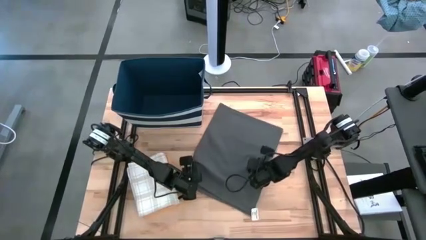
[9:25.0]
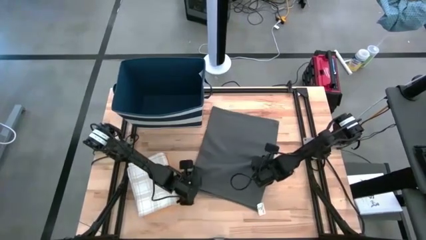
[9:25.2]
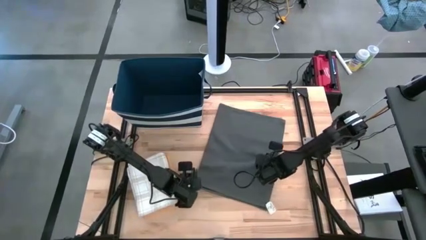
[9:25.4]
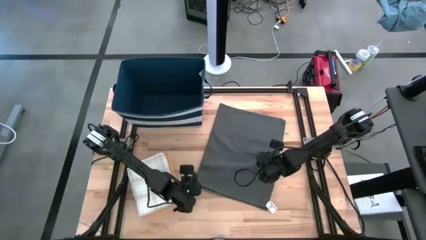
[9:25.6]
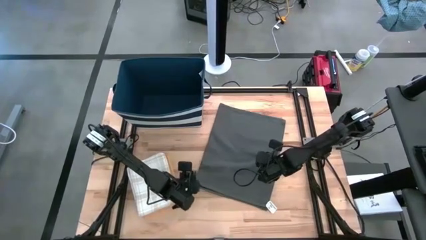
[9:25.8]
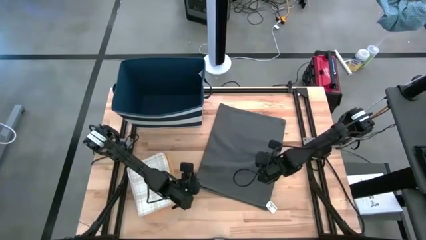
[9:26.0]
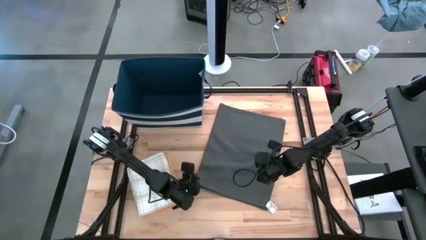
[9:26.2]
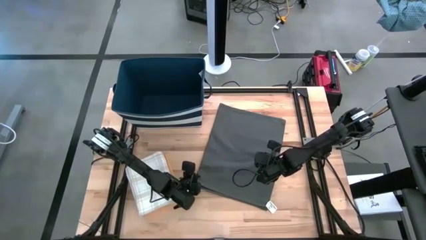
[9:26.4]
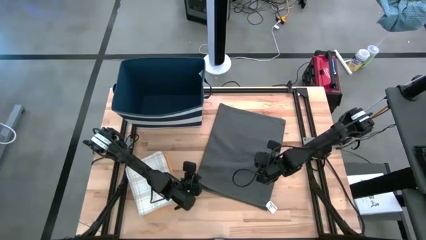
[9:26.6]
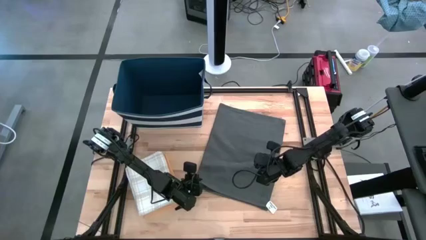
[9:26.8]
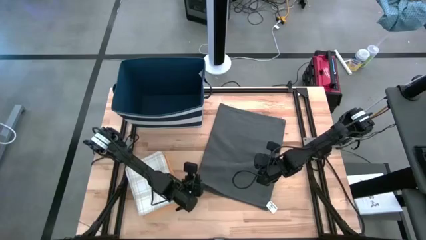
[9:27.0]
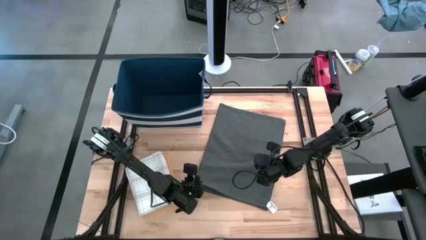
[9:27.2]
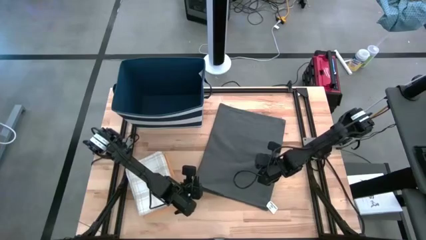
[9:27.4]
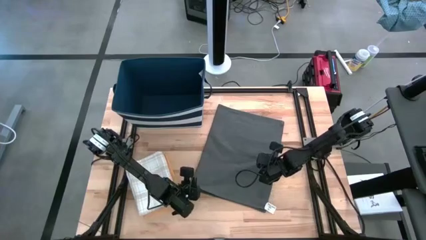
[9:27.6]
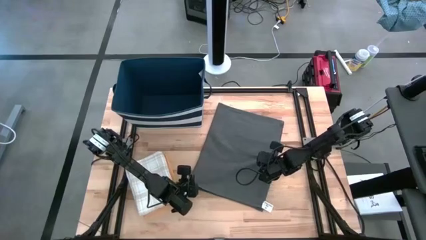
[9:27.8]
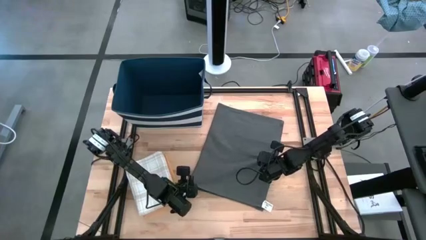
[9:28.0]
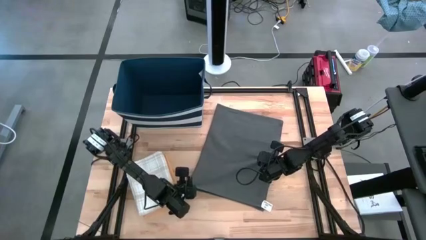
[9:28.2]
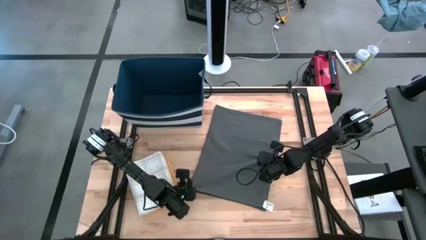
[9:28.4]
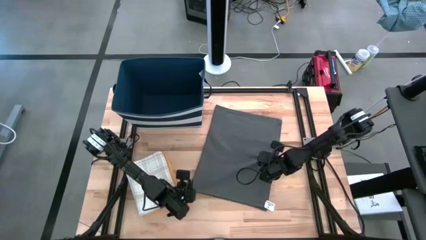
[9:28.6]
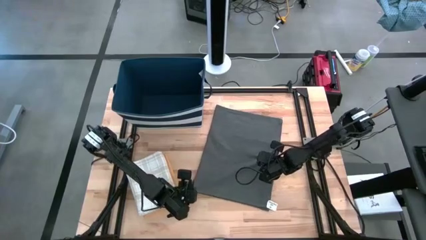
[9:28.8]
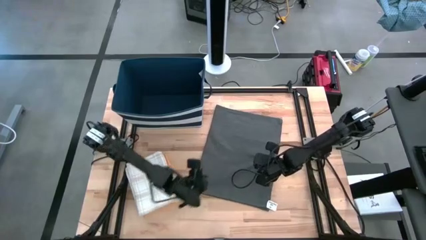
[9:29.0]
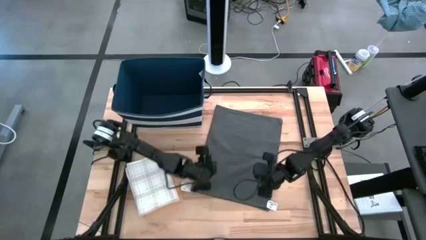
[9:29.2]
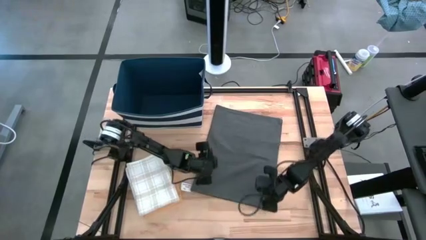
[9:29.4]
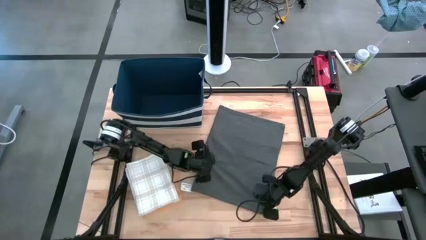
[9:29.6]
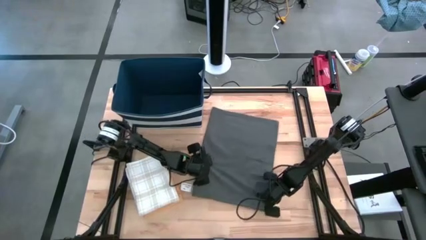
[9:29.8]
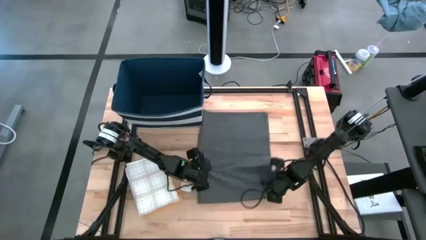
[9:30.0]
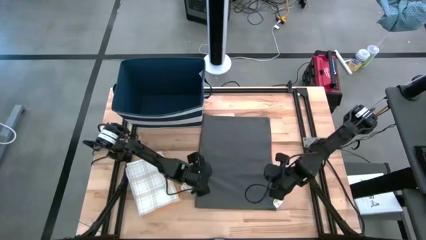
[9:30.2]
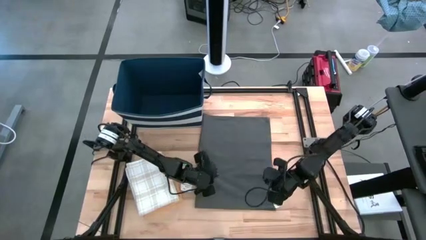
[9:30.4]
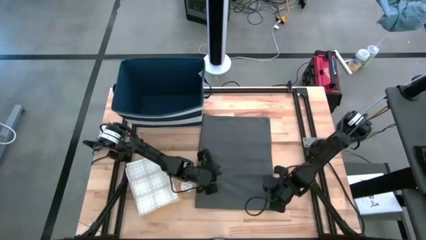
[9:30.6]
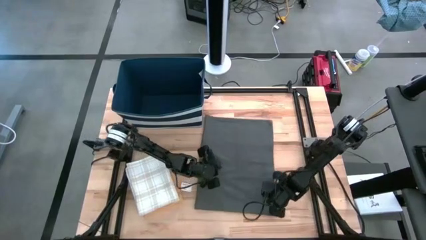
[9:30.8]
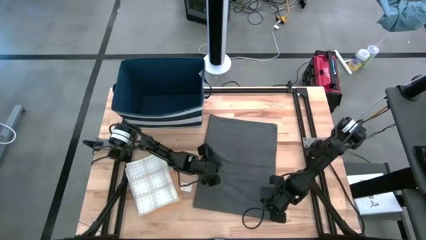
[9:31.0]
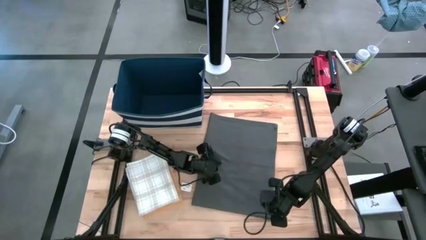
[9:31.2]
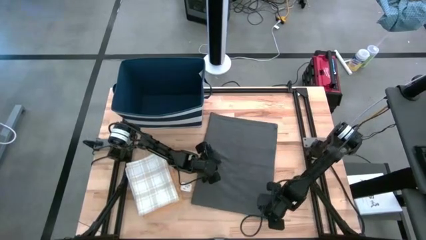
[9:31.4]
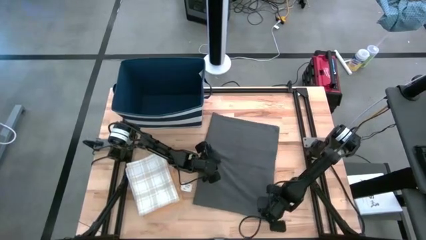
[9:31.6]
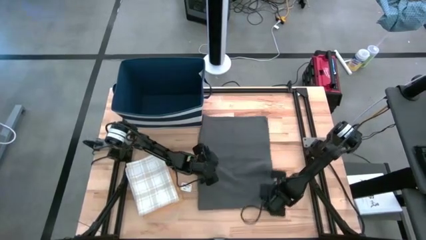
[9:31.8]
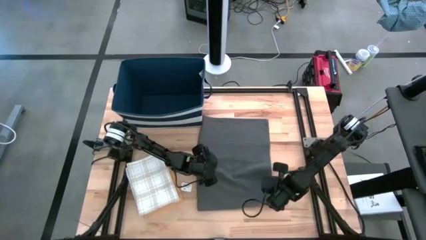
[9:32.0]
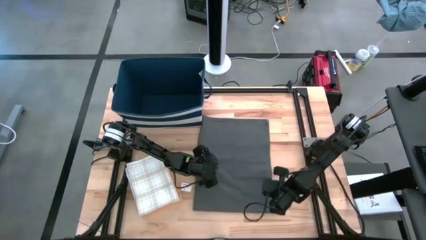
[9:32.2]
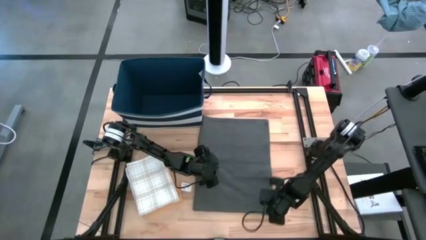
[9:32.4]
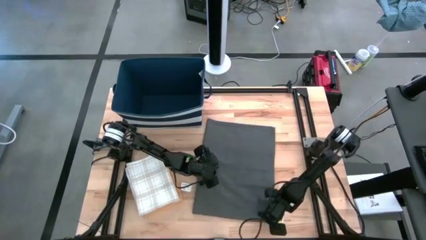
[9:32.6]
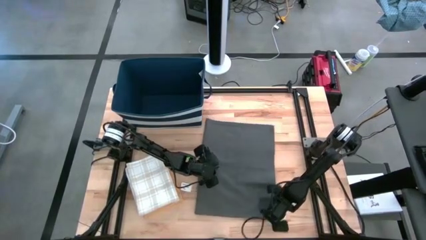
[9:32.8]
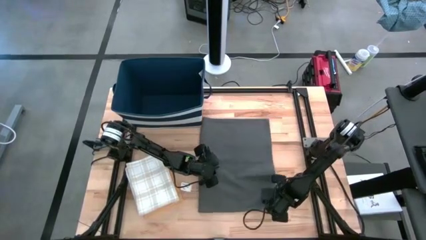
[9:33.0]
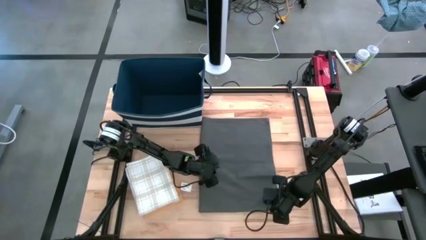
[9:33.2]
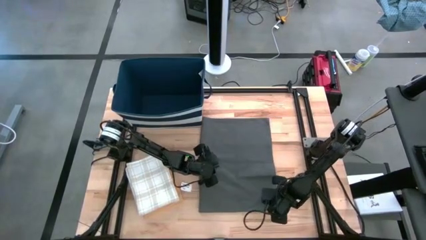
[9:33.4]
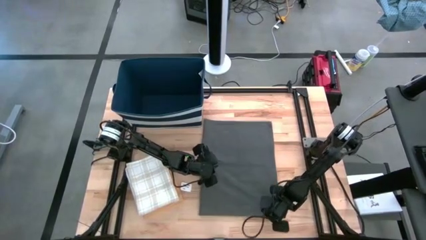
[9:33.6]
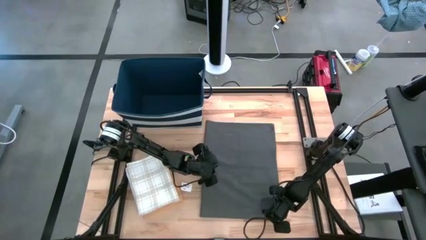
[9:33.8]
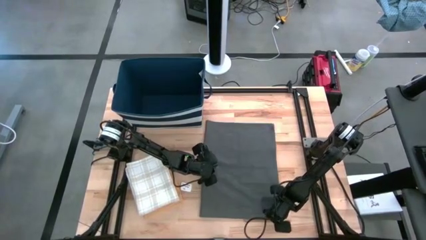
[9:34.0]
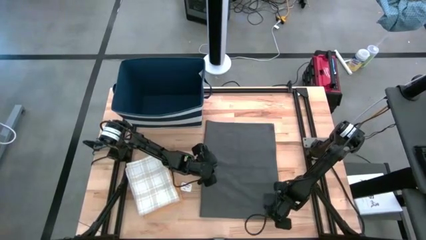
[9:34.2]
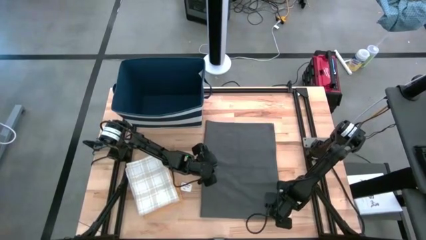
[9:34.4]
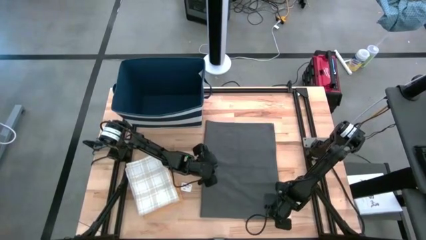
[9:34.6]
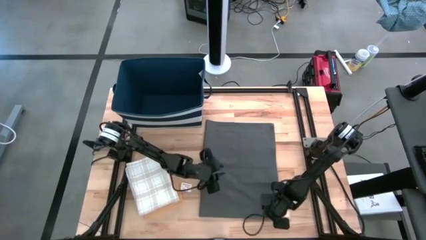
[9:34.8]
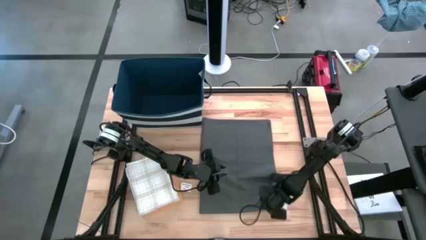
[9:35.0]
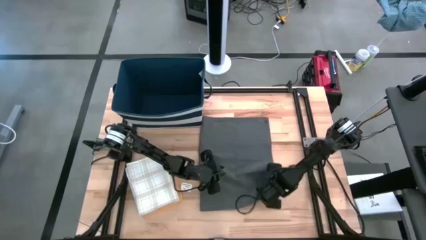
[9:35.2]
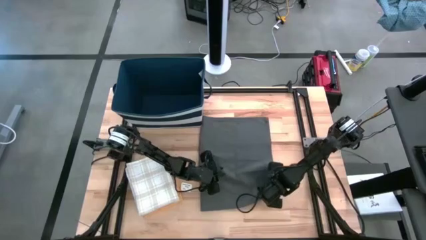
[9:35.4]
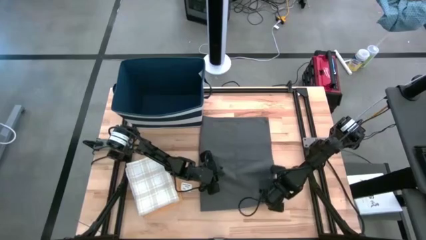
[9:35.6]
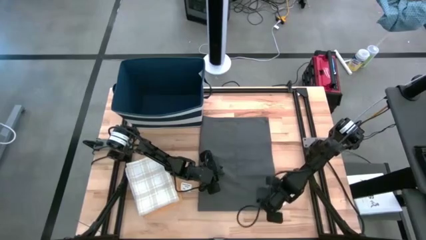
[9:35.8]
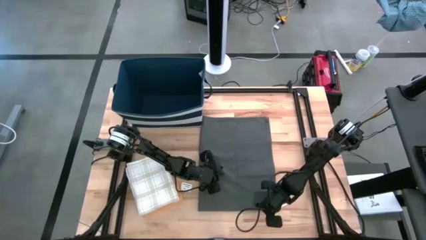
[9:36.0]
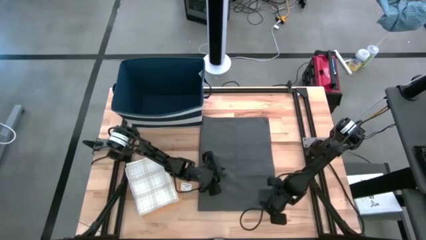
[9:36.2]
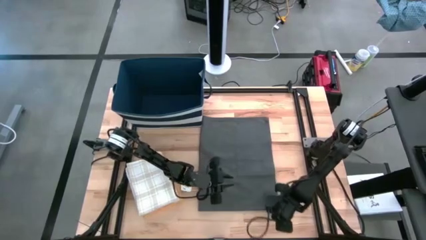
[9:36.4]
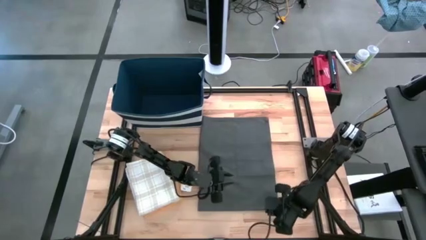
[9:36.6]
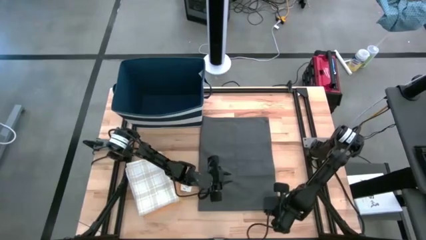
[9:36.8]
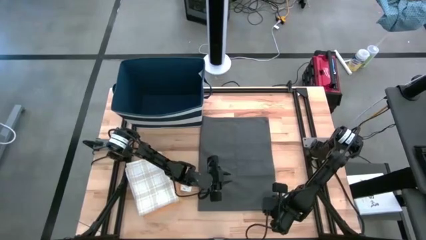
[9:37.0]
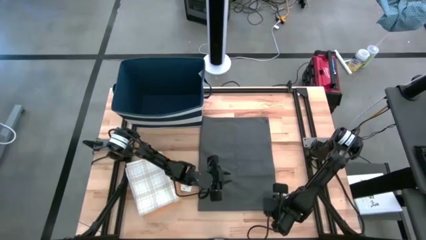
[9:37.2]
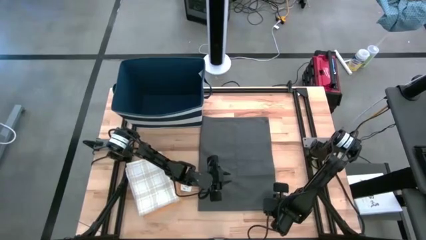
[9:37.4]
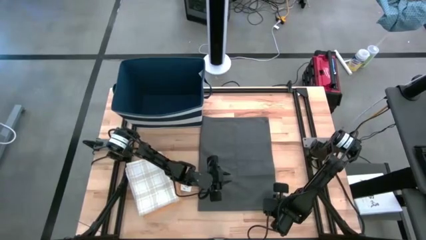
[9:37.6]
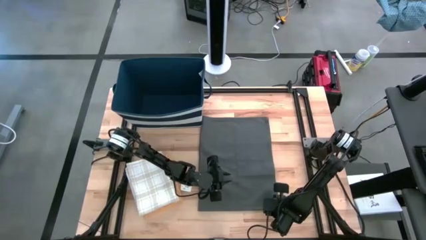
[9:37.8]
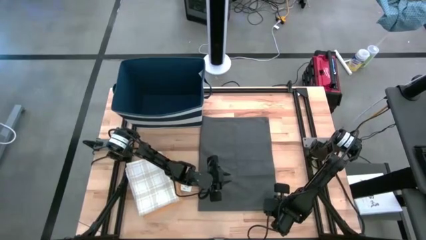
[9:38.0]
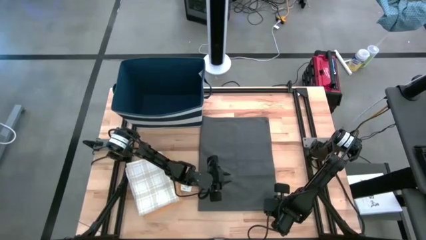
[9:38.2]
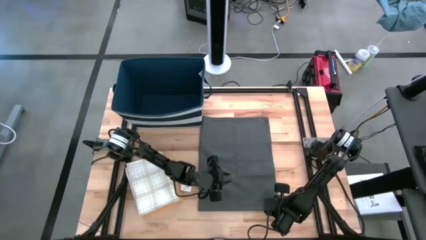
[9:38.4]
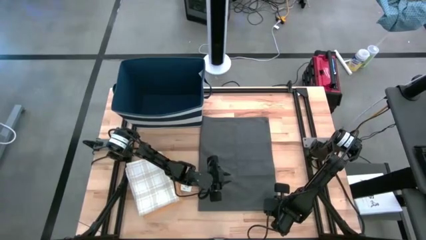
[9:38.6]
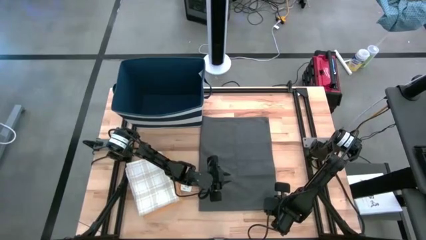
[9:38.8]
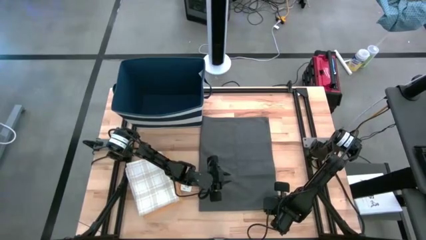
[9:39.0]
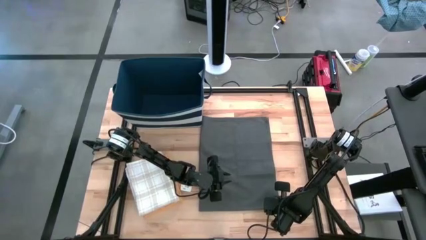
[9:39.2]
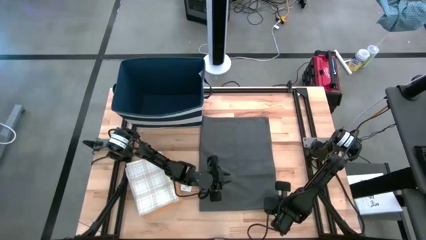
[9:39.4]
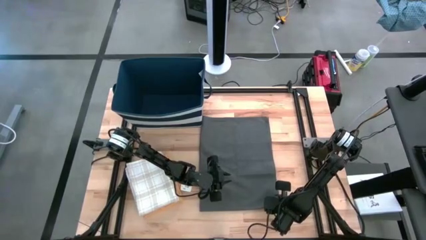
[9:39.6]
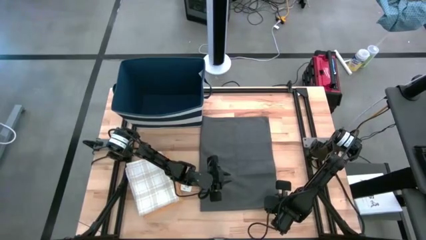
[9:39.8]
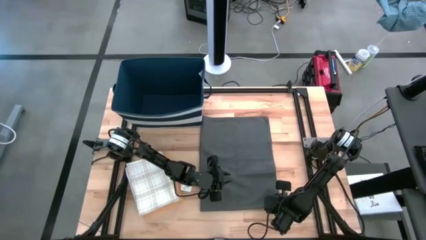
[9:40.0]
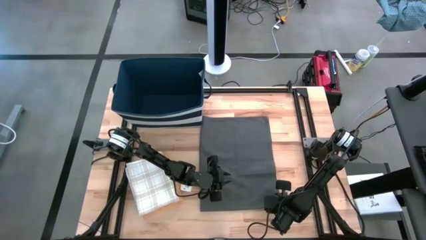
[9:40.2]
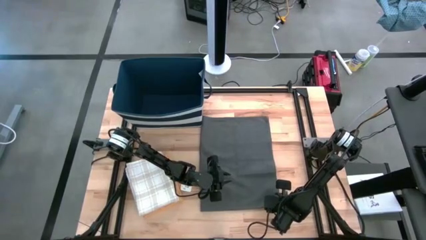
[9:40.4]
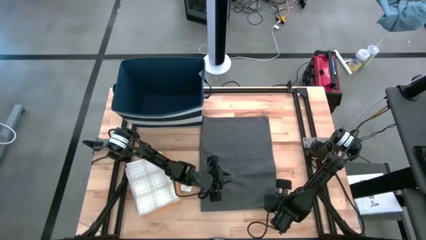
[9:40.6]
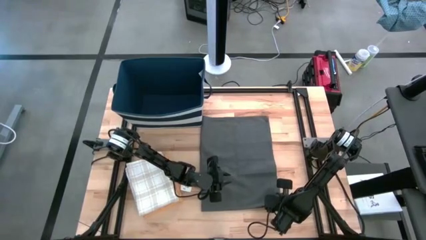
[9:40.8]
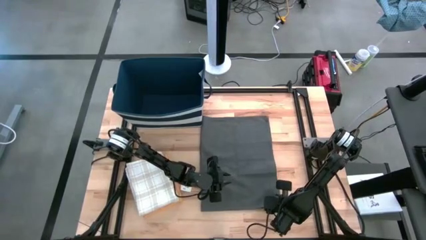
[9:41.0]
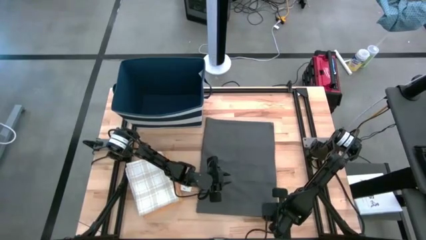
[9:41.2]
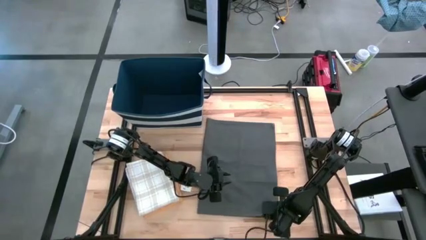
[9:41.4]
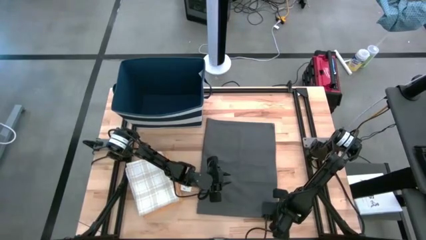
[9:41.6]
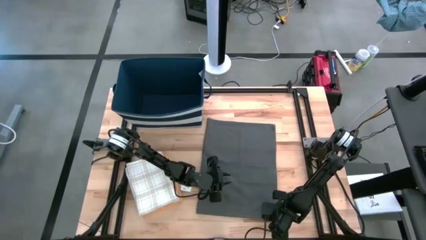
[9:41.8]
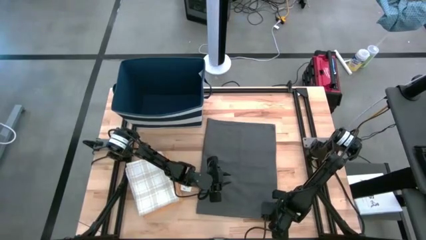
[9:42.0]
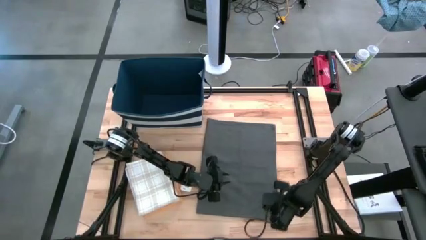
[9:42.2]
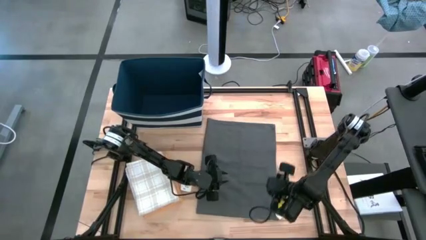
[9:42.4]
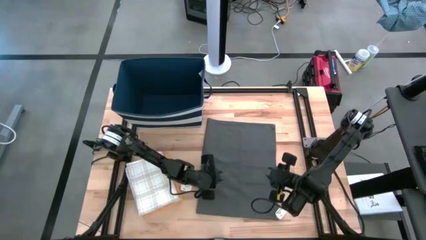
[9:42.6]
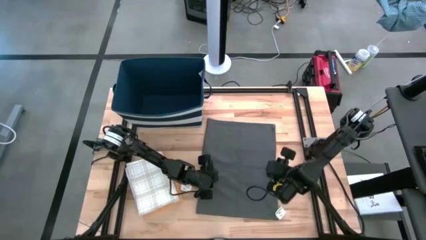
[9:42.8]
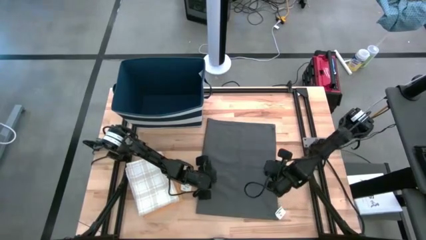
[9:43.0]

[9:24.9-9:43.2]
Task: Fold towel
Fold the gray kitchen towel
